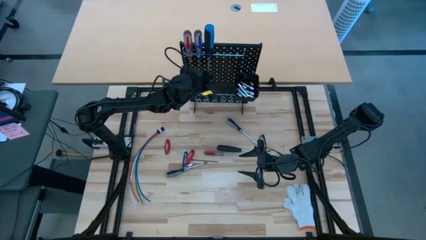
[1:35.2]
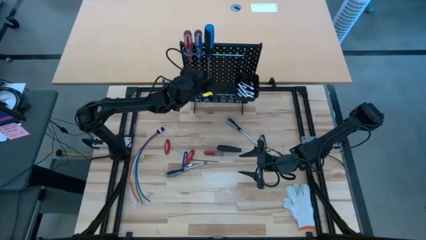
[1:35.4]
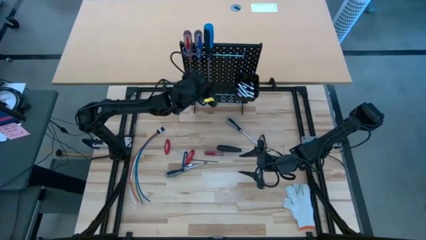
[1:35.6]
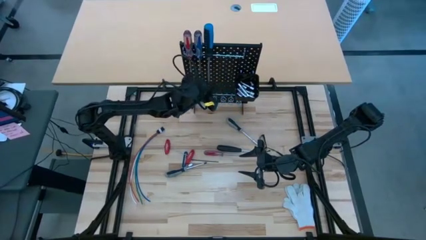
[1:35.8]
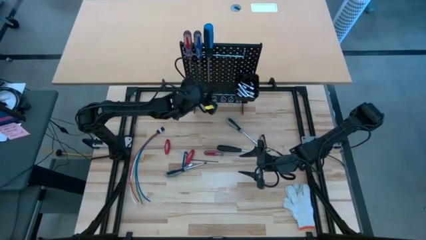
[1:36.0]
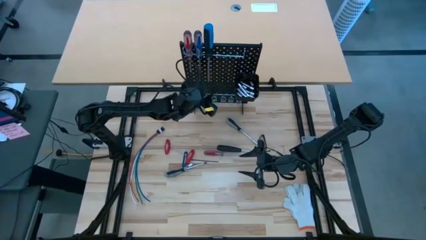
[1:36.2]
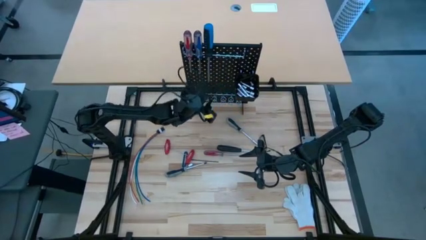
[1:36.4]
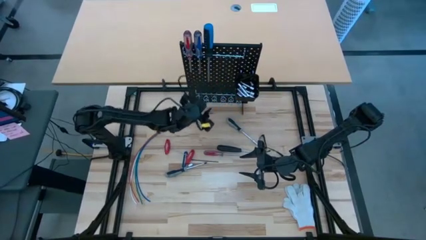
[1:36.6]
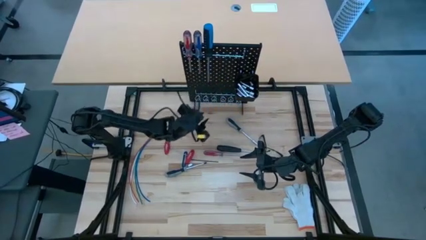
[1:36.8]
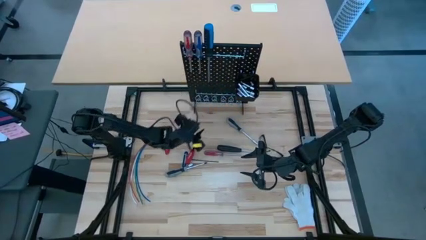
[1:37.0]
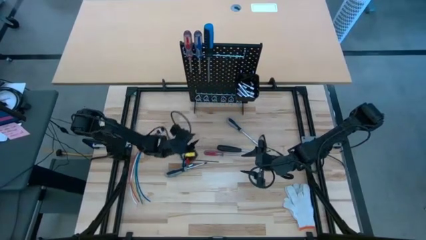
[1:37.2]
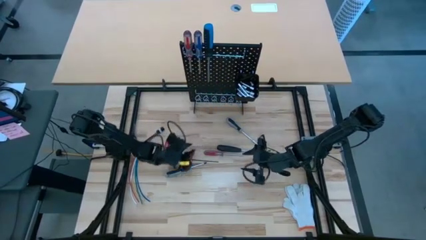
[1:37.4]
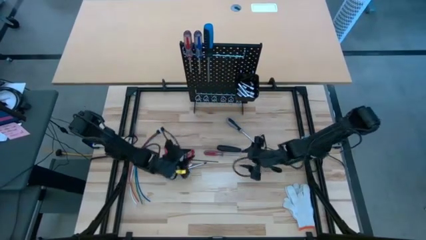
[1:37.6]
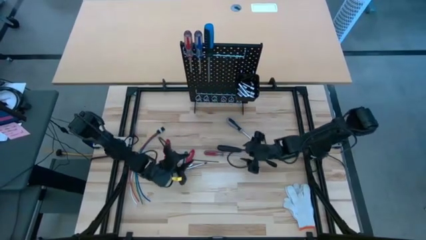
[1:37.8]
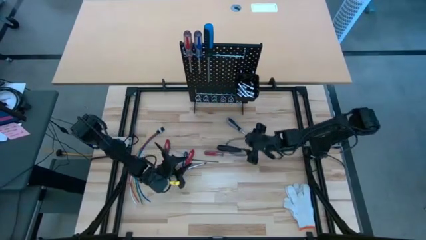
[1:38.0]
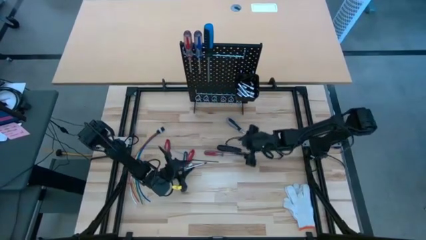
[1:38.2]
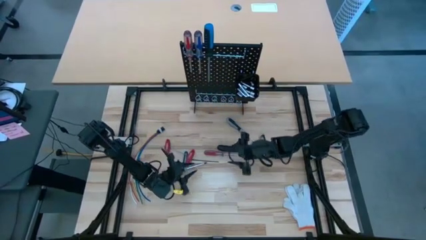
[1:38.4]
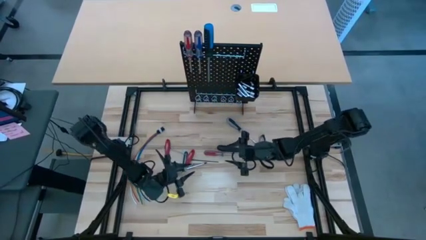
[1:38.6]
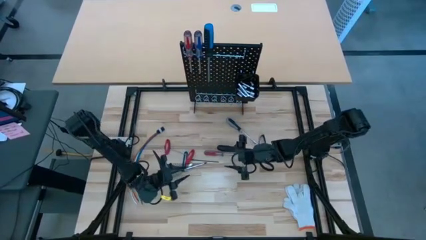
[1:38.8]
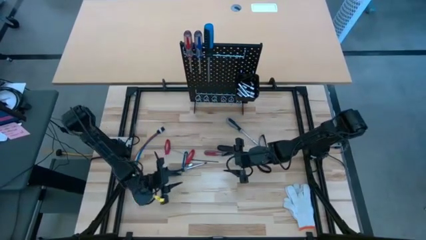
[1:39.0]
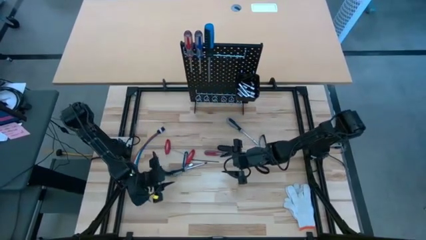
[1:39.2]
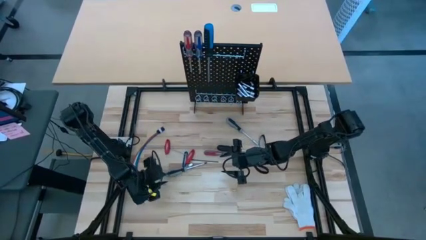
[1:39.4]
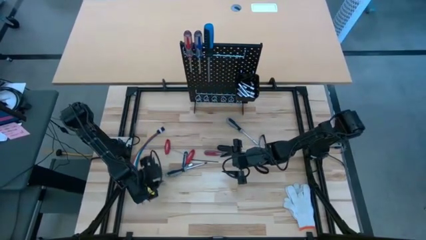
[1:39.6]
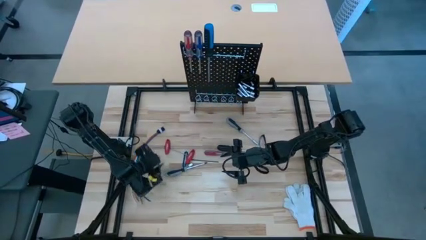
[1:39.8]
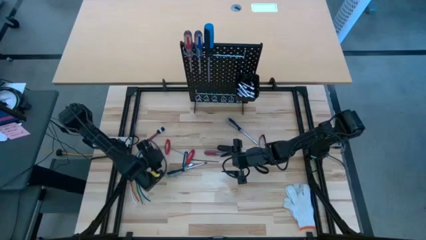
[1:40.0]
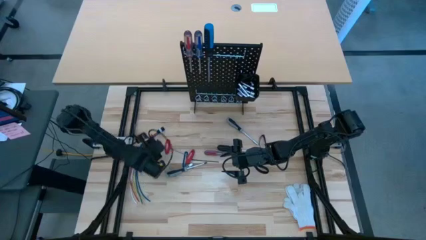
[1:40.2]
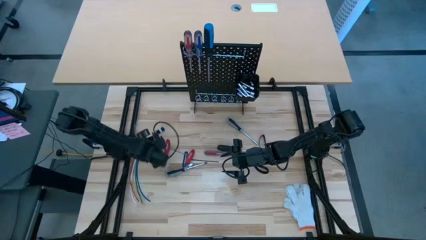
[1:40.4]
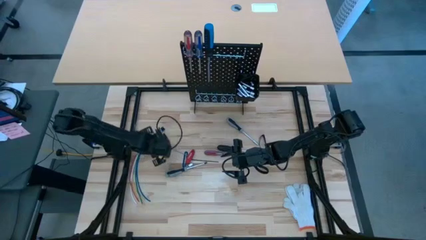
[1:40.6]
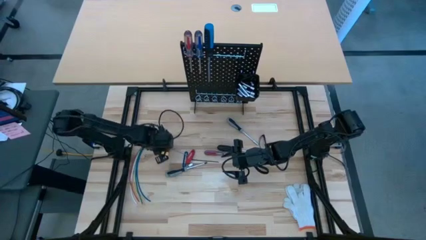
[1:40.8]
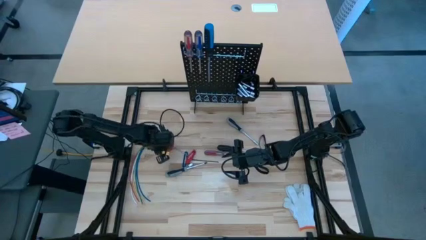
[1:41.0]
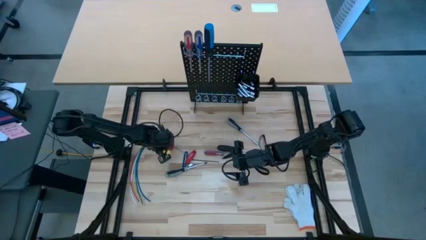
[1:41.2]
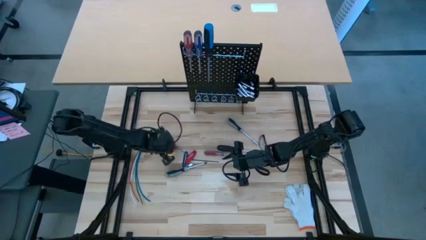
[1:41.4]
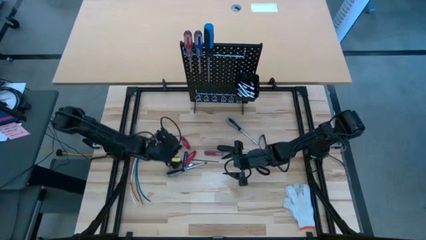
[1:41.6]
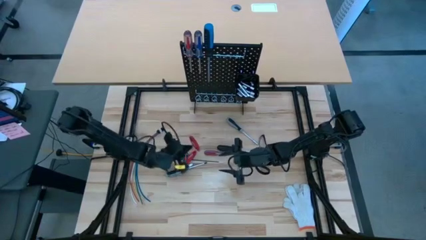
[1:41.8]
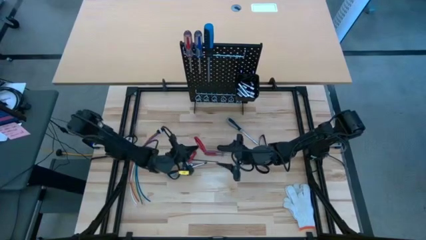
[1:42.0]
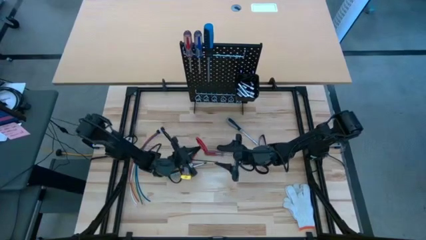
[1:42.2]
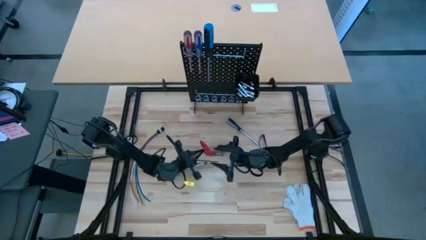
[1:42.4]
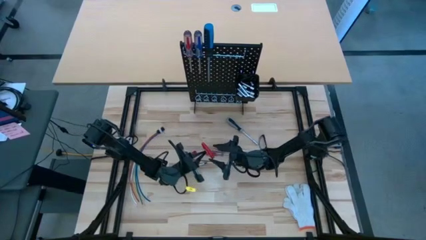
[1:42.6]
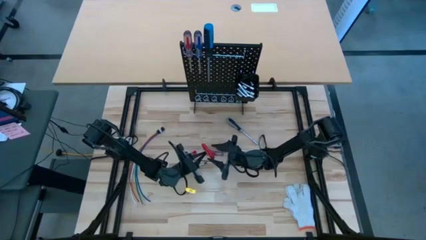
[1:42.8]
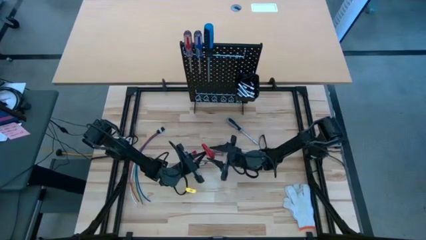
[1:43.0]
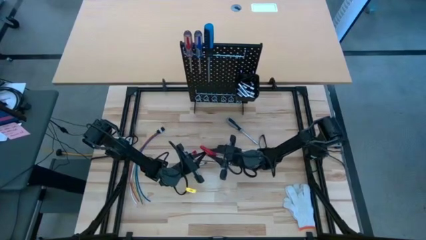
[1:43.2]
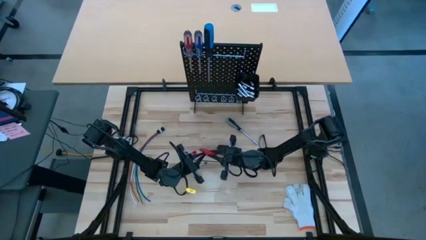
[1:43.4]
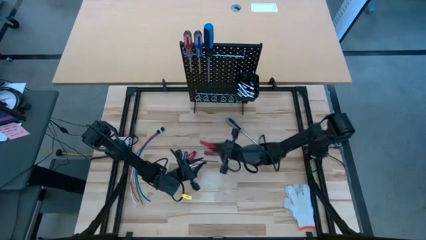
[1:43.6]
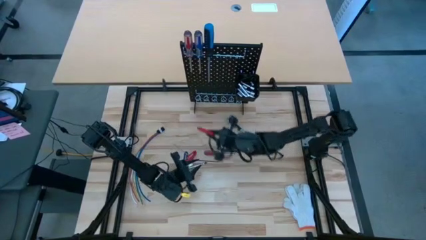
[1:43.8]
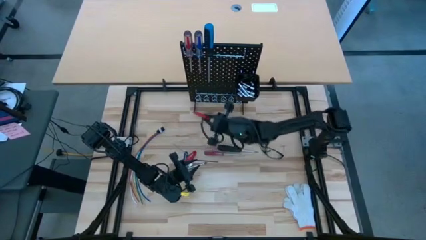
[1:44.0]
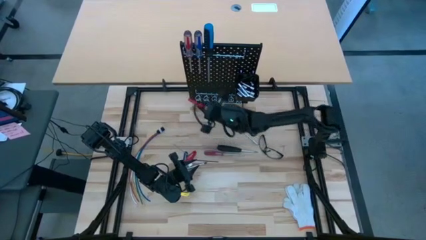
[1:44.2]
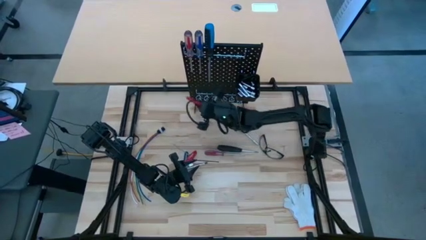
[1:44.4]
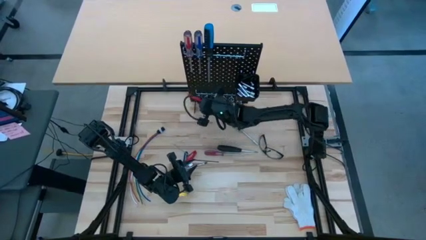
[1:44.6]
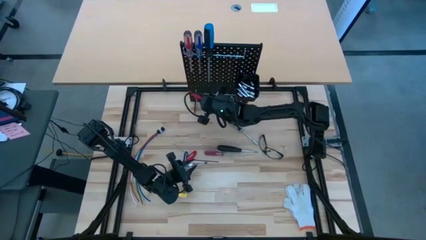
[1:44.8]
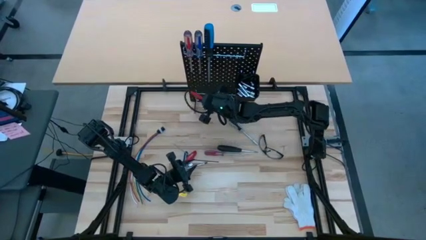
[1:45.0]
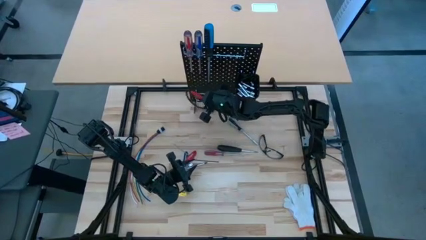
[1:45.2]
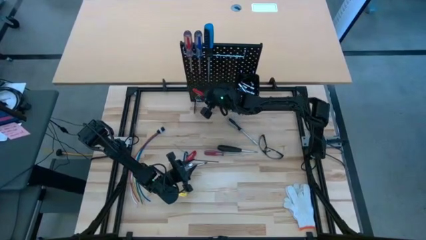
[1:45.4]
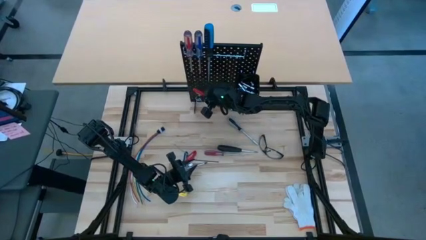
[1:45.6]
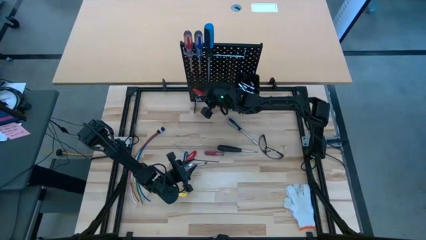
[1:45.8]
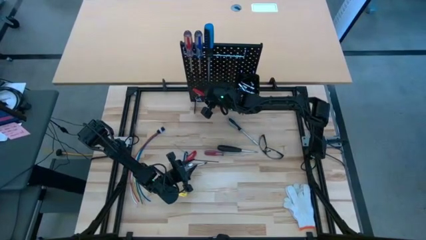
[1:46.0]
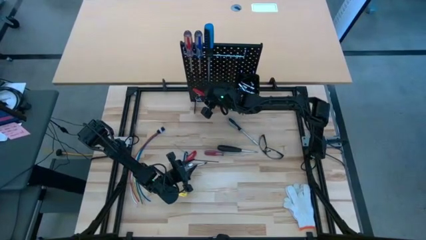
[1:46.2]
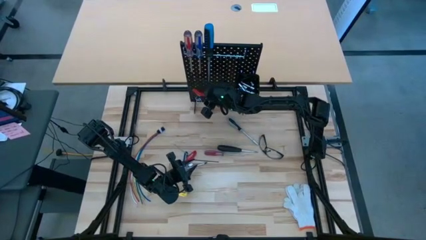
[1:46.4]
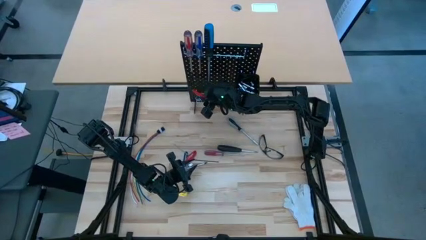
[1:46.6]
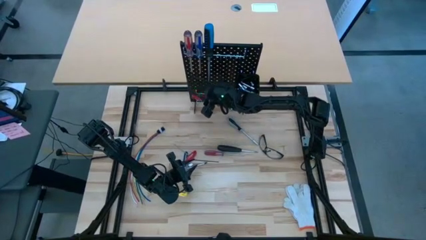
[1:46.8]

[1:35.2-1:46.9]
Task: Hang tools onto peg board
Hang the allen wrench on the pegboard
